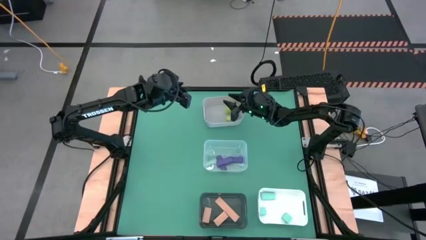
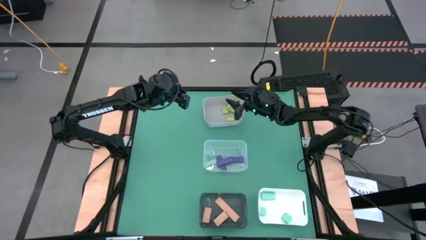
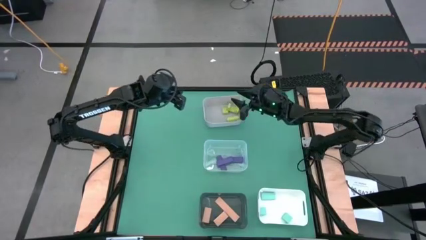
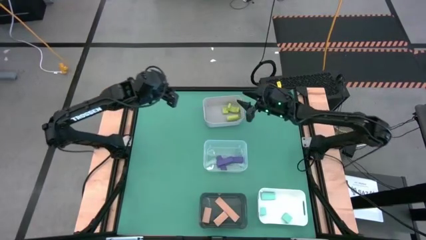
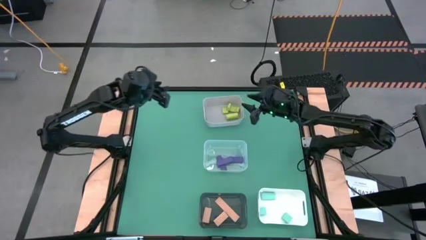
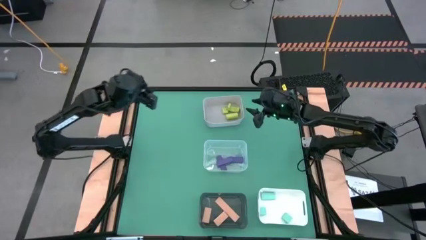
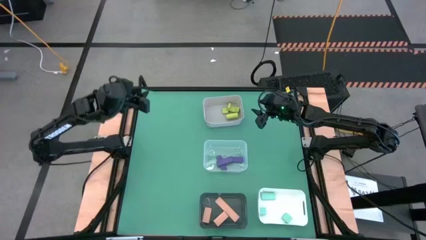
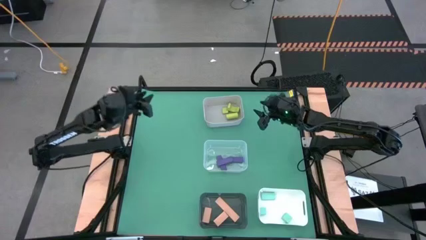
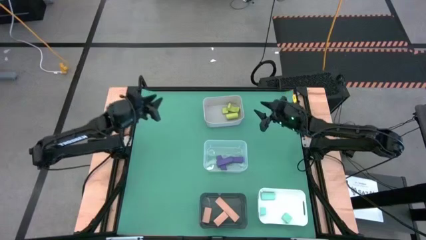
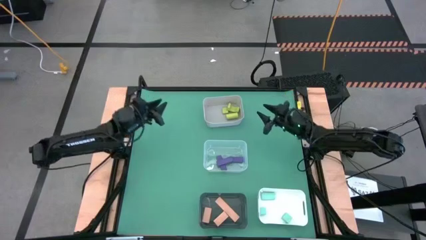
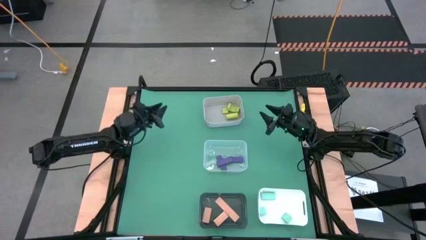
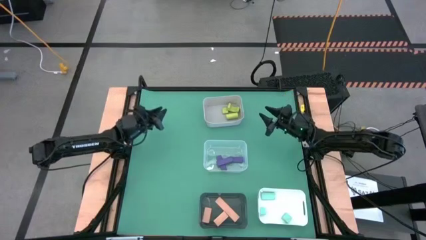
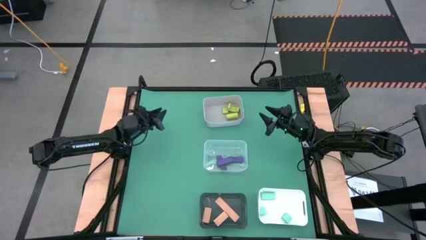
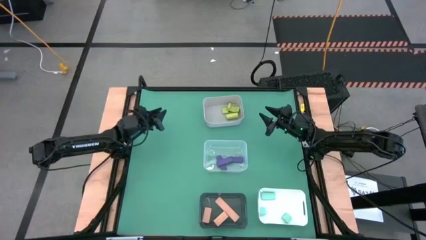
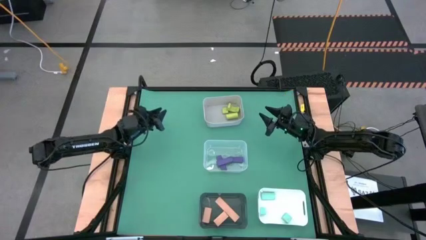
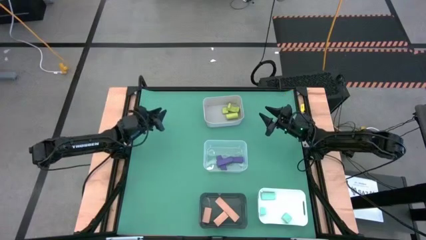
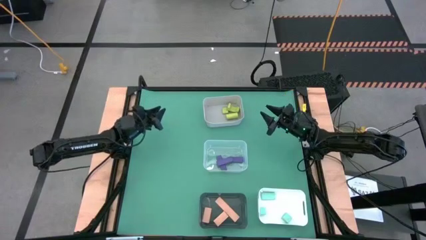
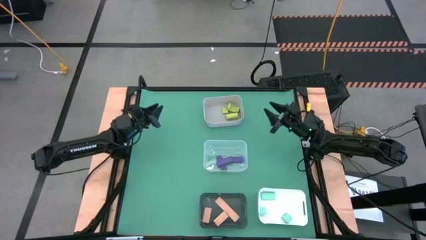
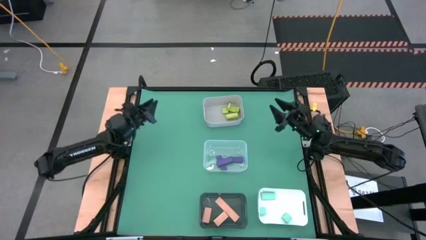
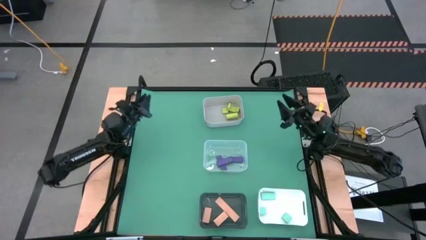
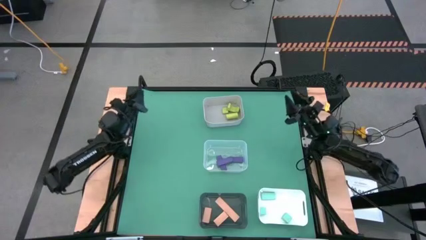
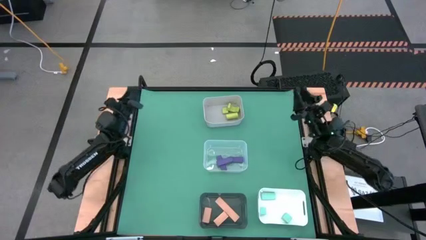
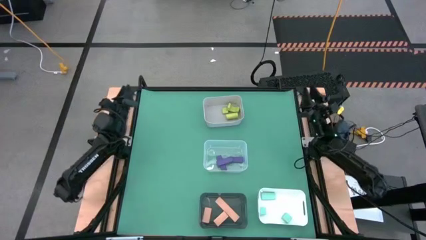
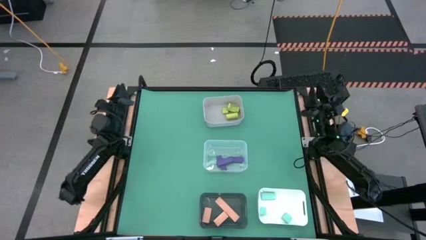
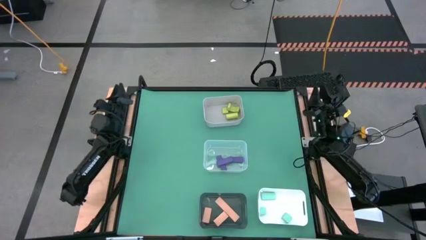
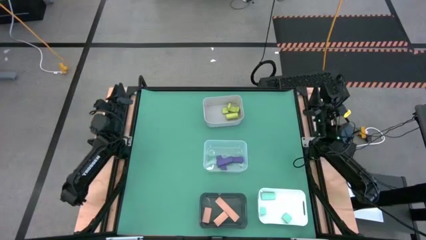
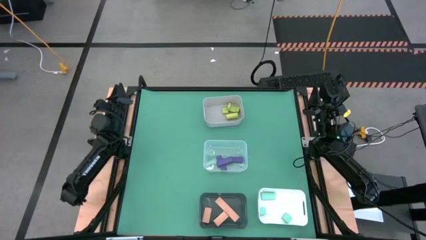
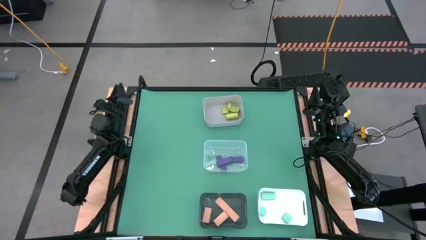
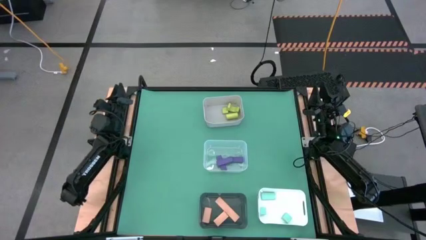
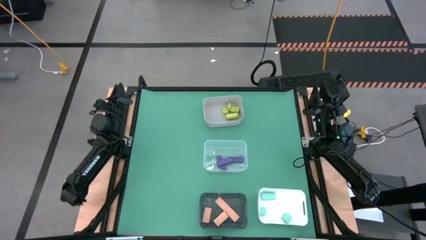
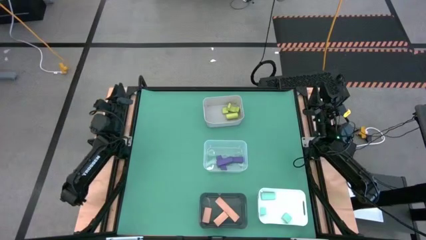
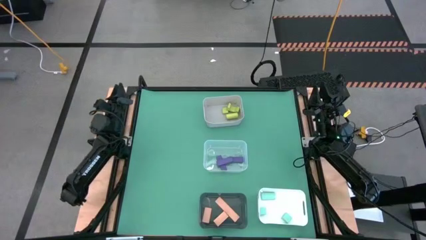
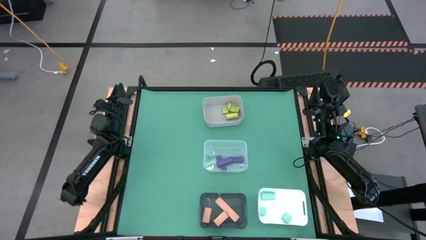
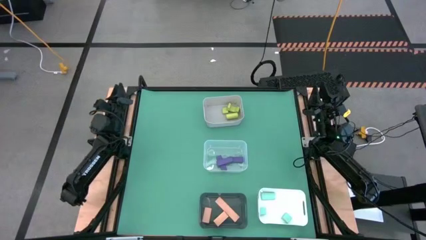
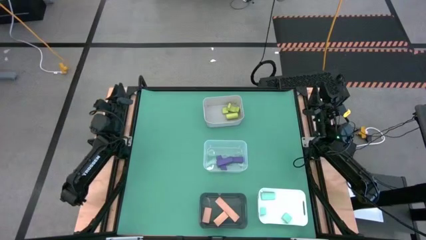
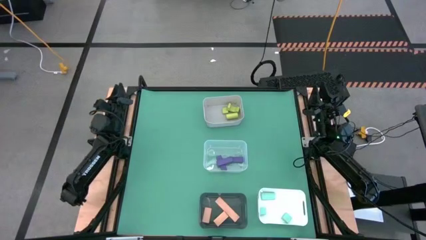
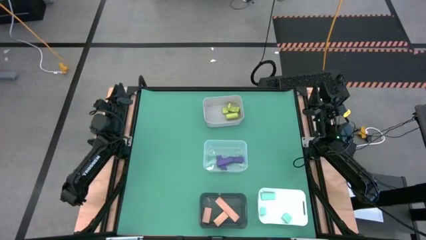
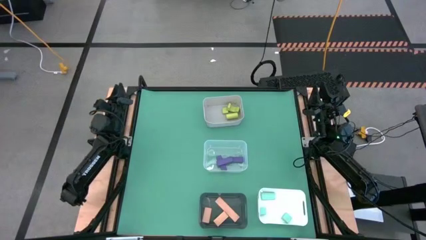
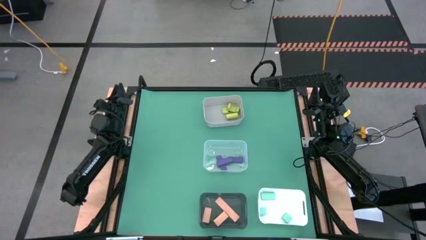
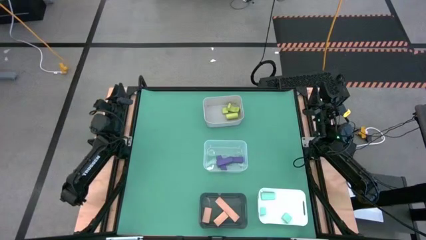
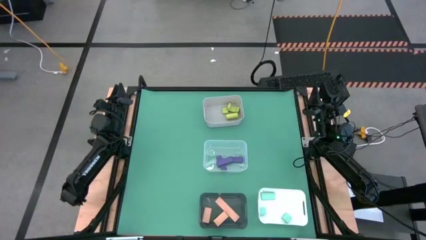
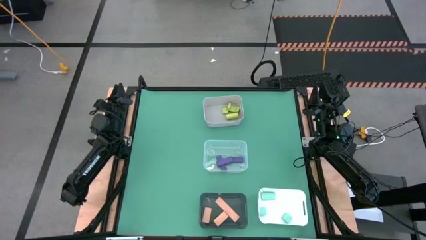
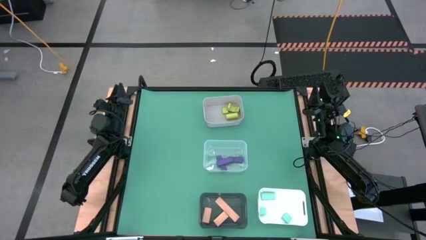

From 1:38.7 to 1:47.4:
Task: Sort & place blocks by color
Return to Home Position

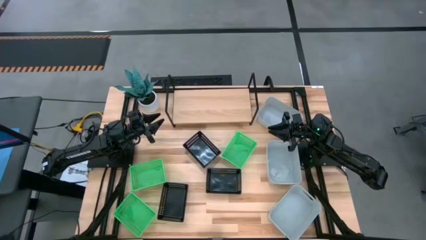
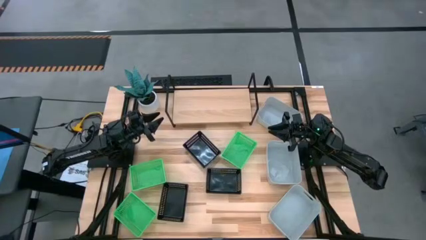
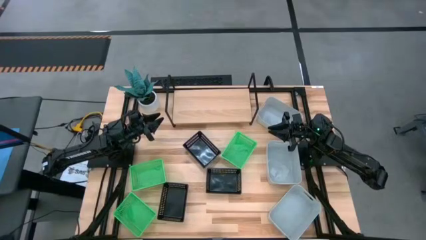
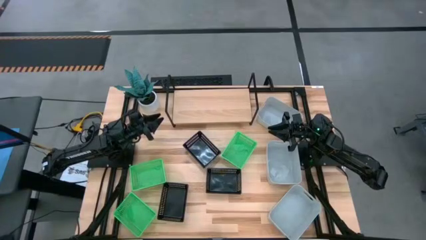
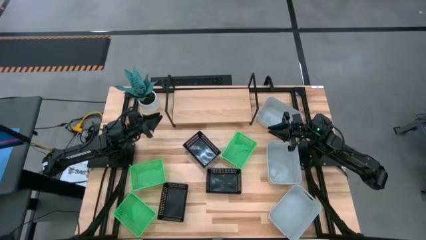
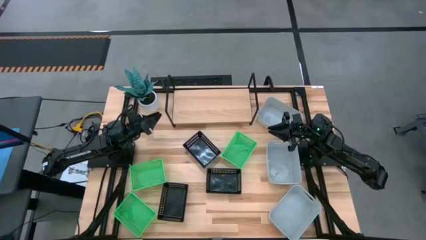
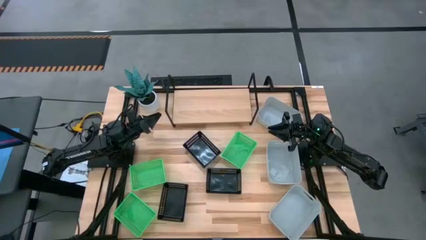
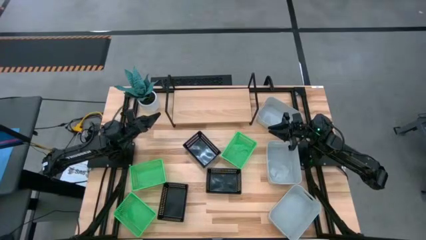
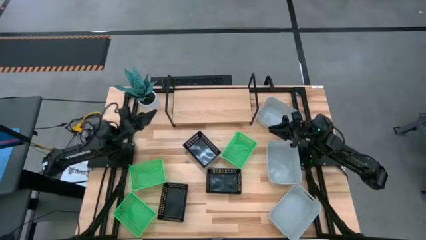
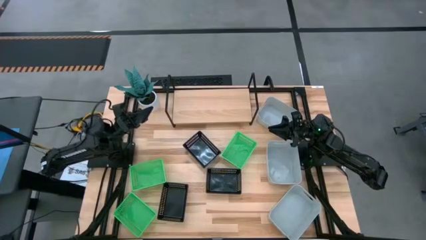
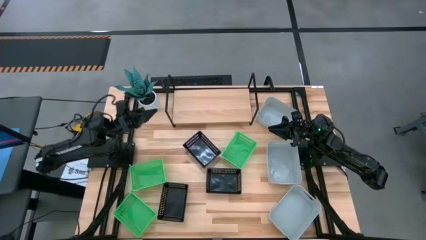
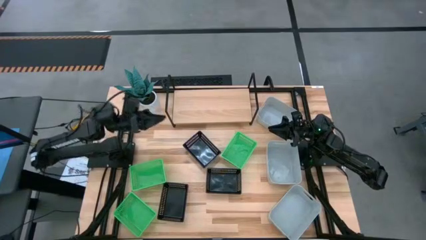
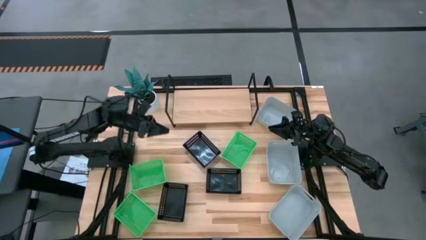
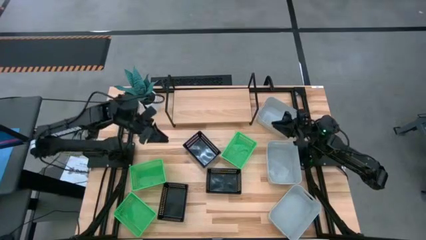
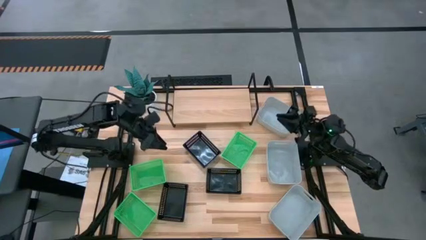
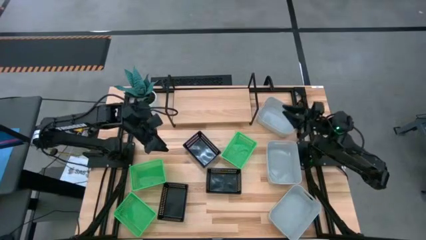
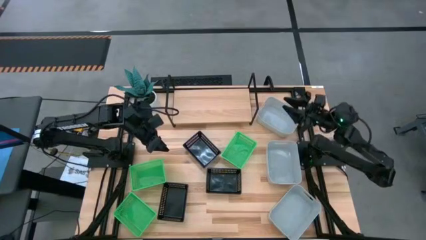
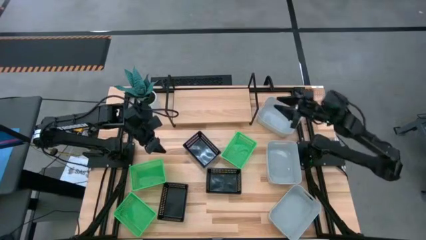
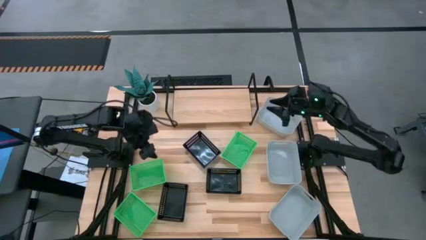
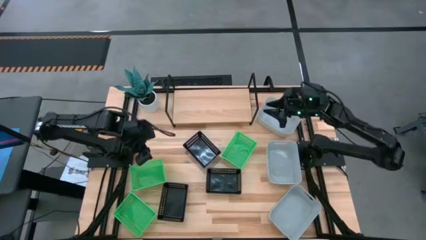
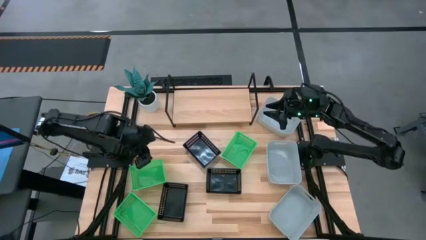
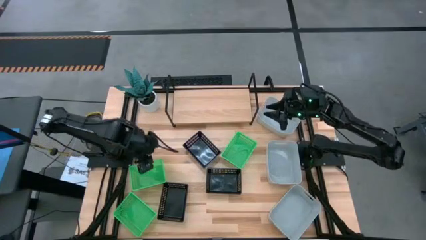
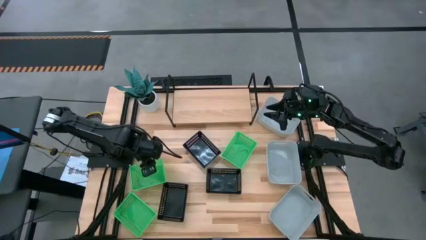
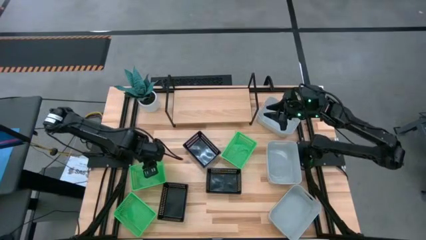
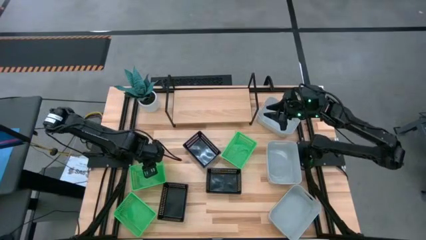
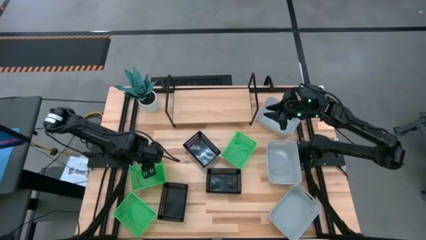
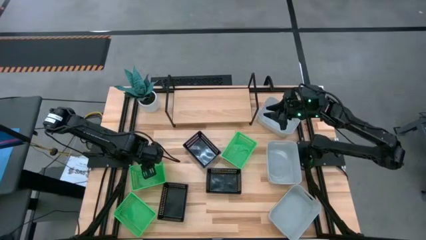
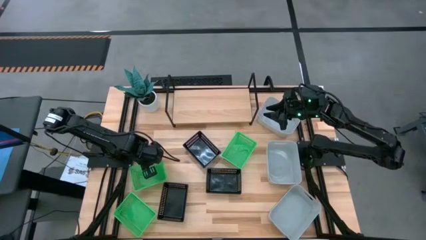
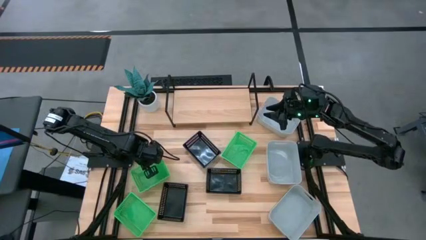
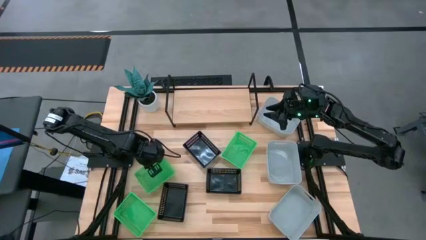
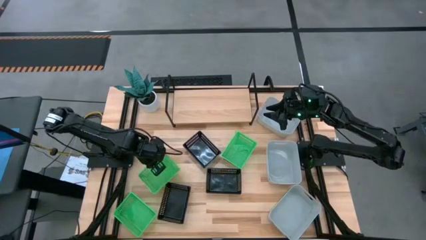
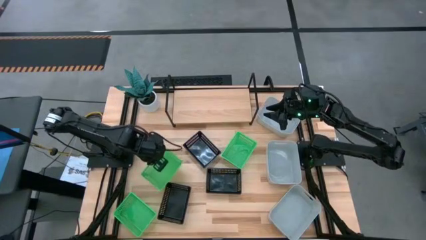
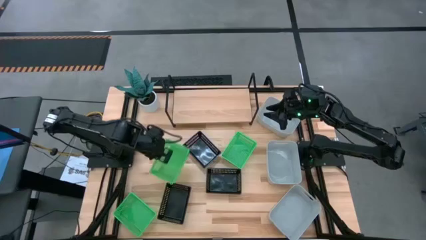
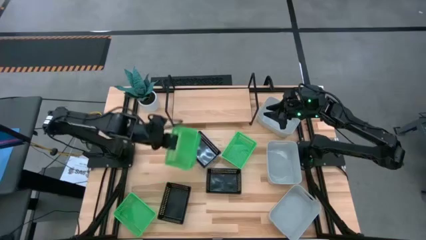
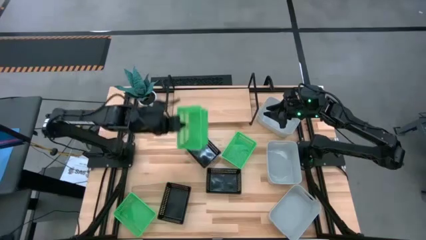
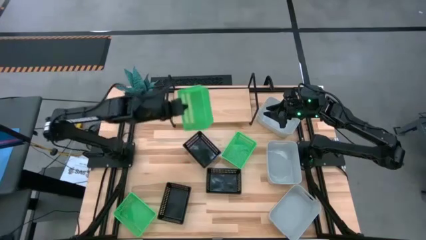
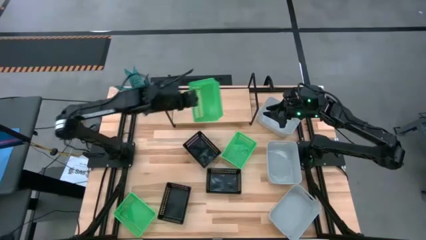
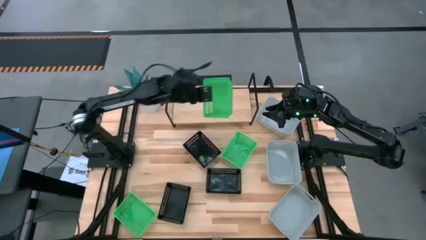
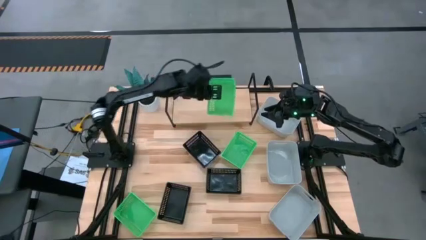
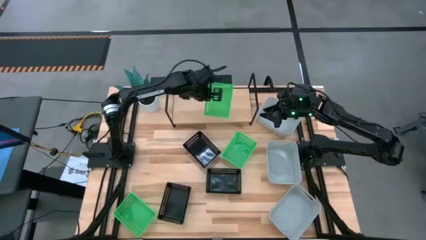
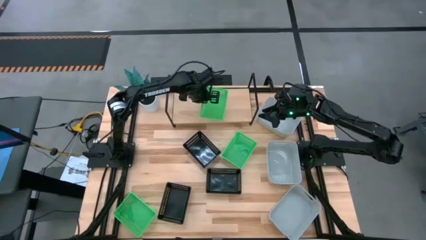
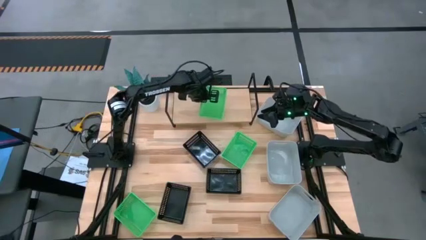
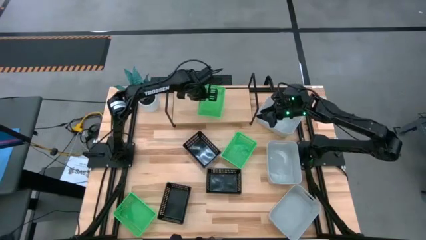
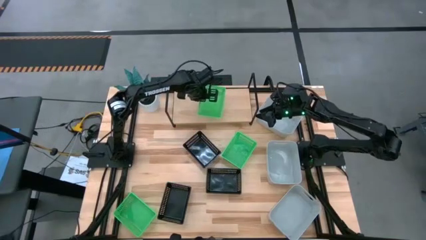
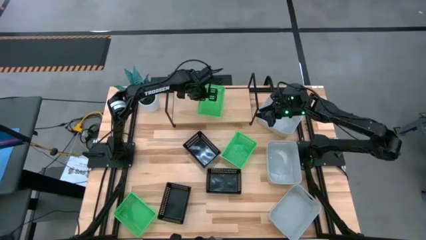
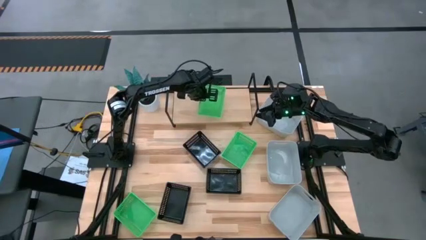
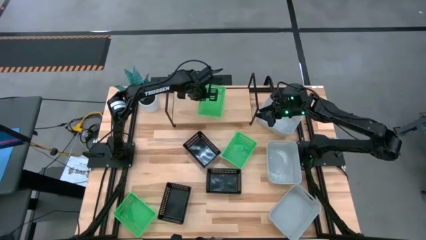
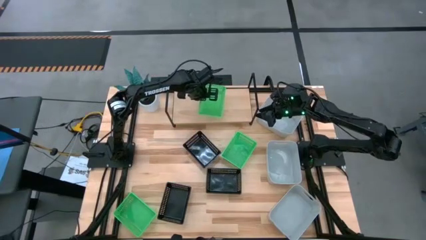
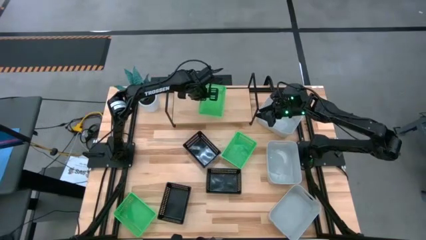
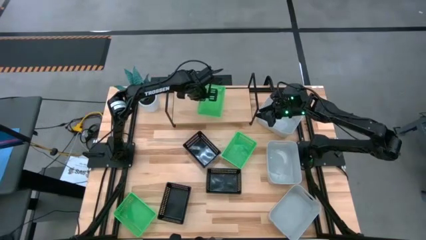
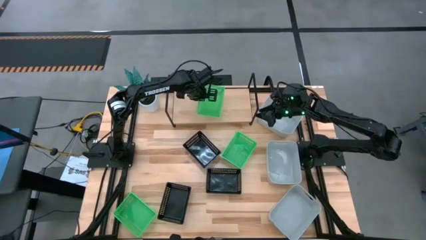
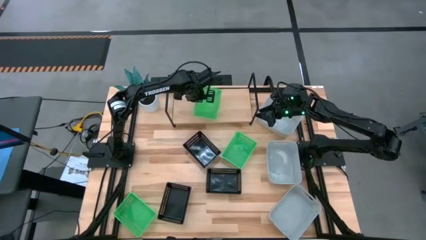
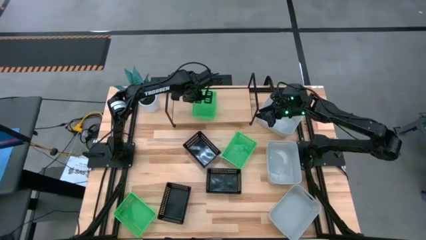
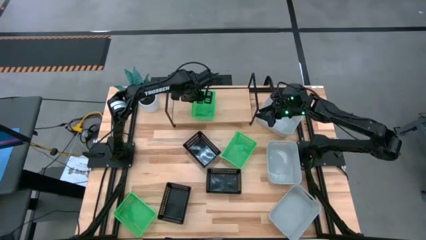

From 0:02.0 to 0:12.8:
Task: Stack baskets on shelf by color
Put the left green bin on the shelf
